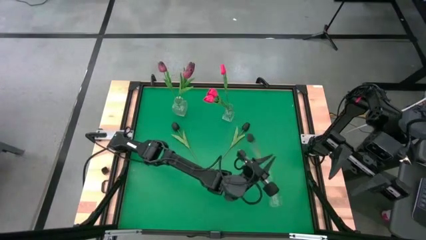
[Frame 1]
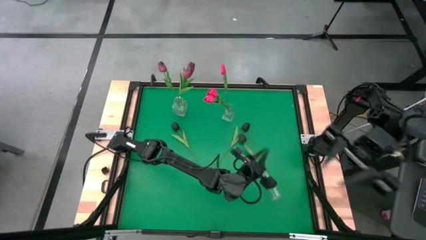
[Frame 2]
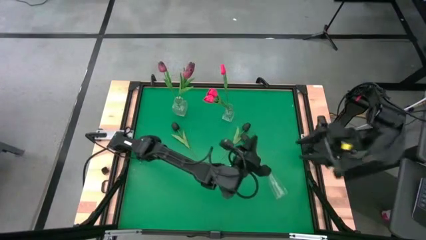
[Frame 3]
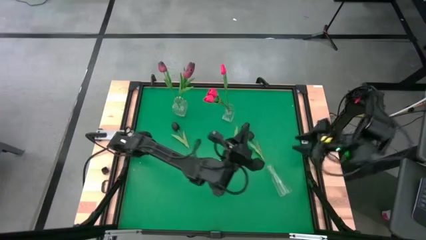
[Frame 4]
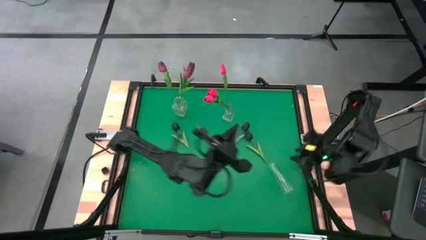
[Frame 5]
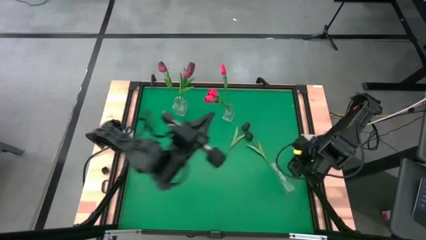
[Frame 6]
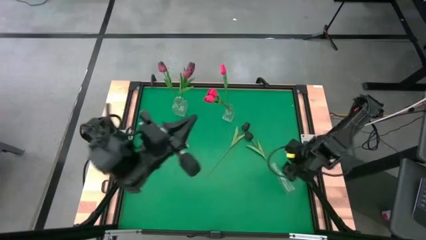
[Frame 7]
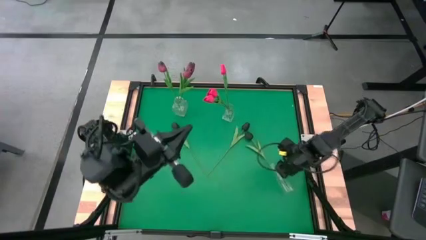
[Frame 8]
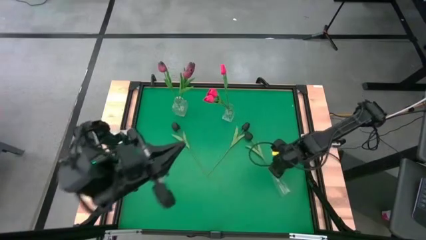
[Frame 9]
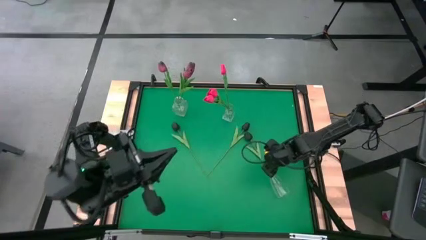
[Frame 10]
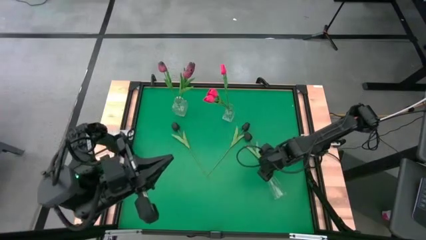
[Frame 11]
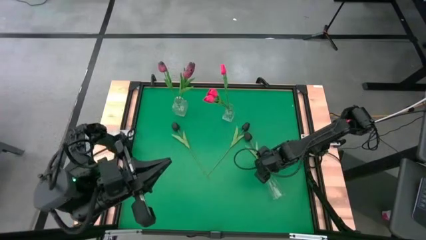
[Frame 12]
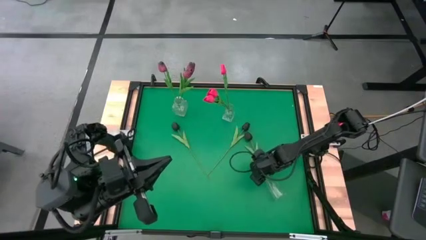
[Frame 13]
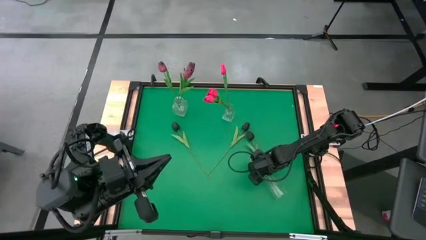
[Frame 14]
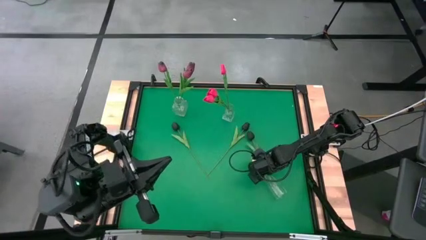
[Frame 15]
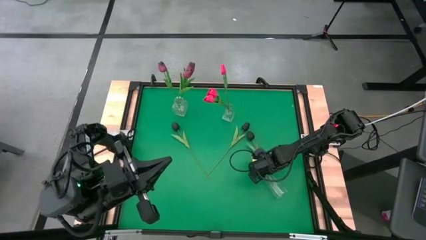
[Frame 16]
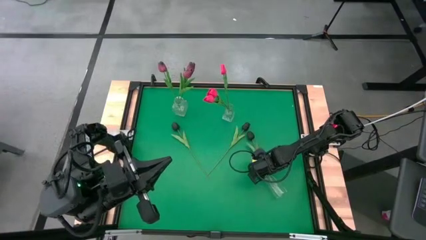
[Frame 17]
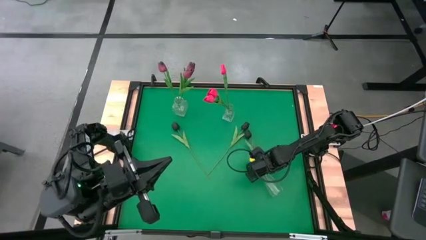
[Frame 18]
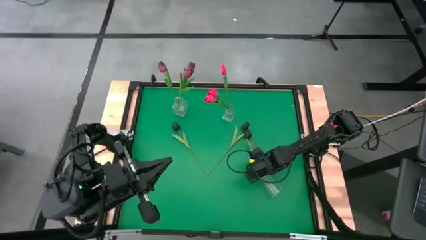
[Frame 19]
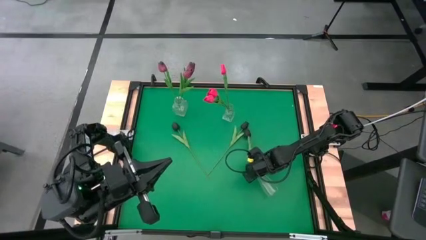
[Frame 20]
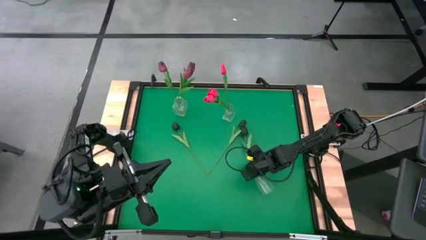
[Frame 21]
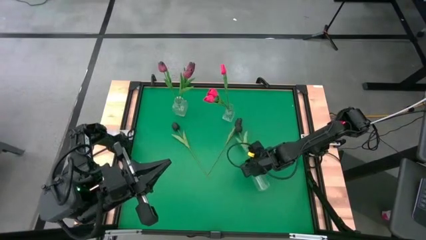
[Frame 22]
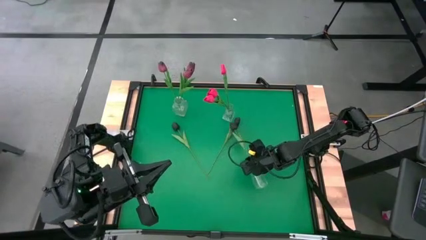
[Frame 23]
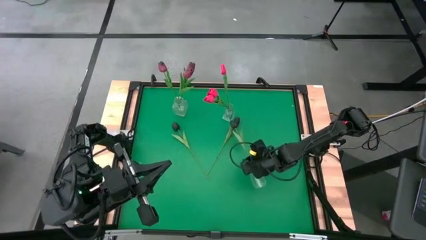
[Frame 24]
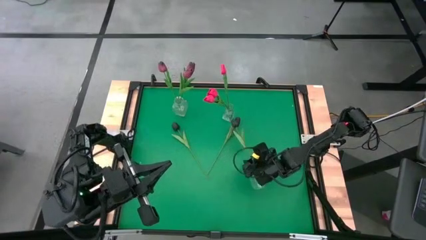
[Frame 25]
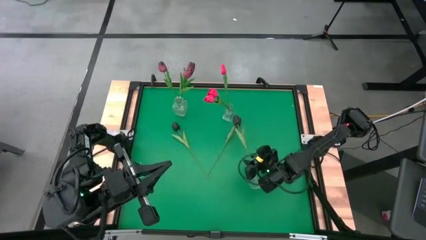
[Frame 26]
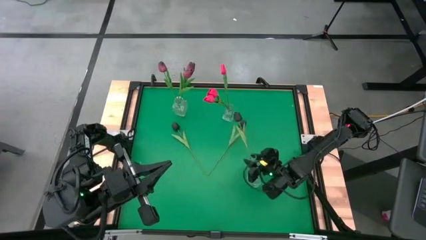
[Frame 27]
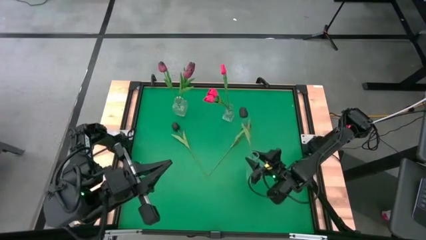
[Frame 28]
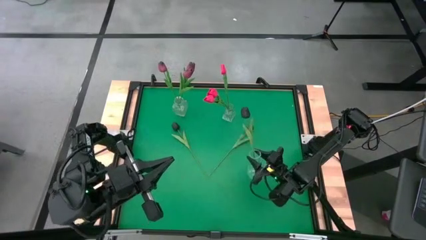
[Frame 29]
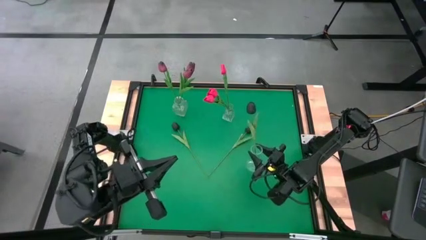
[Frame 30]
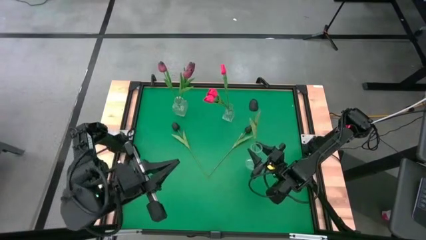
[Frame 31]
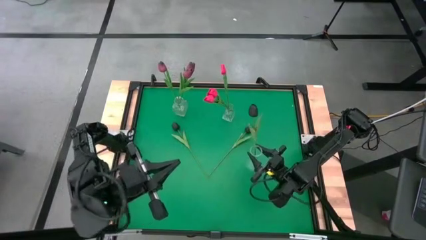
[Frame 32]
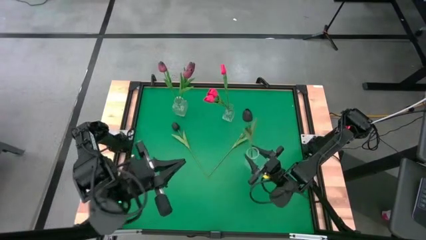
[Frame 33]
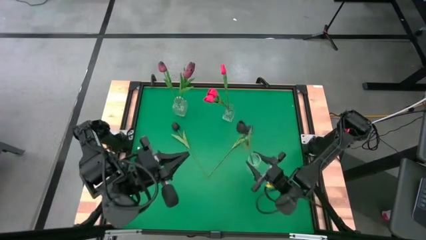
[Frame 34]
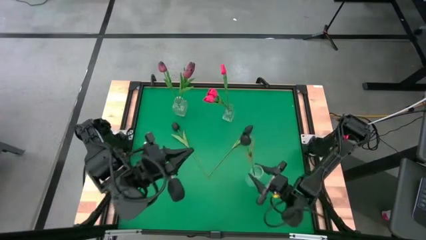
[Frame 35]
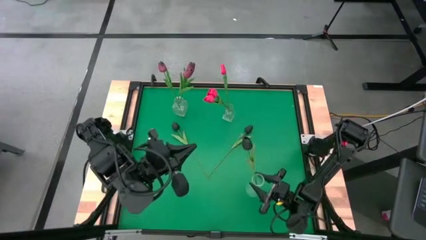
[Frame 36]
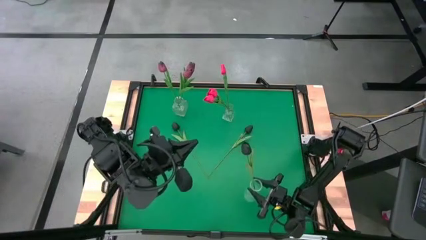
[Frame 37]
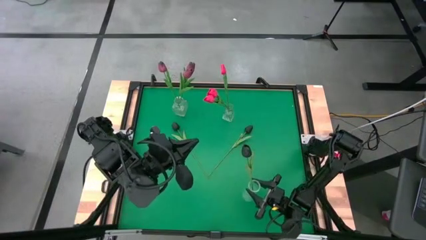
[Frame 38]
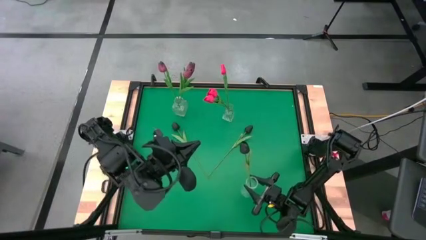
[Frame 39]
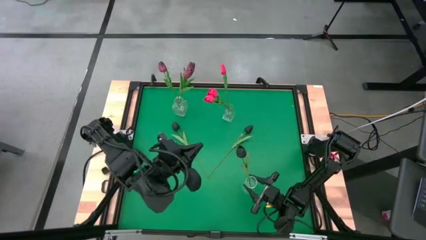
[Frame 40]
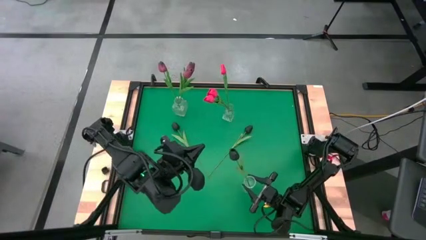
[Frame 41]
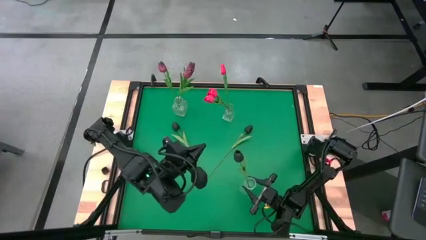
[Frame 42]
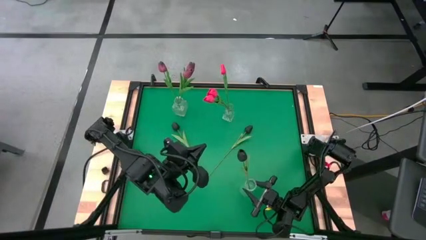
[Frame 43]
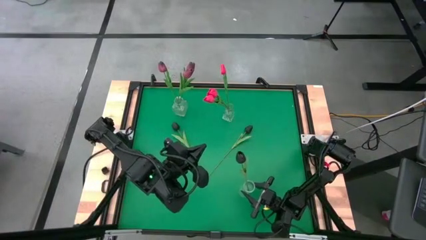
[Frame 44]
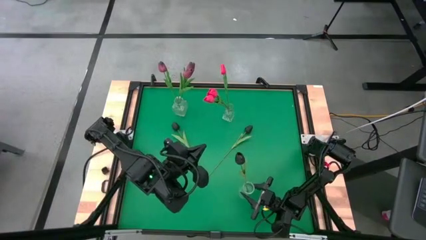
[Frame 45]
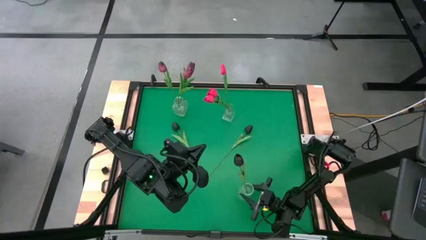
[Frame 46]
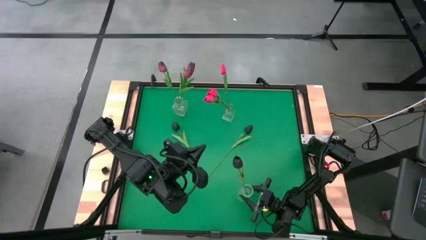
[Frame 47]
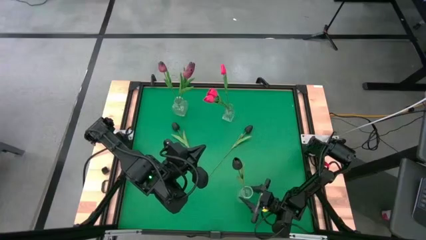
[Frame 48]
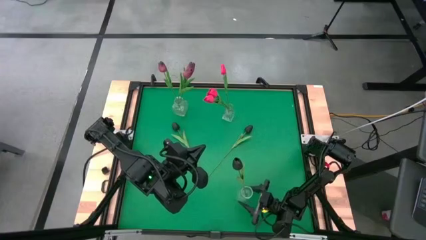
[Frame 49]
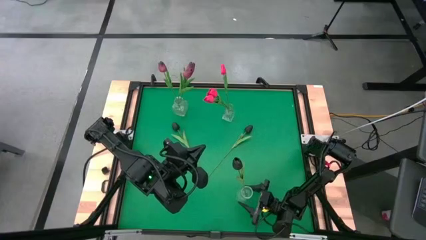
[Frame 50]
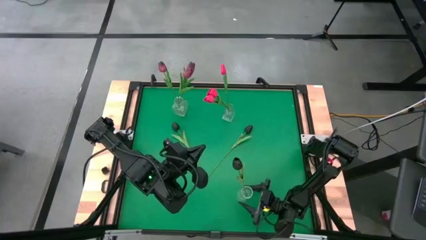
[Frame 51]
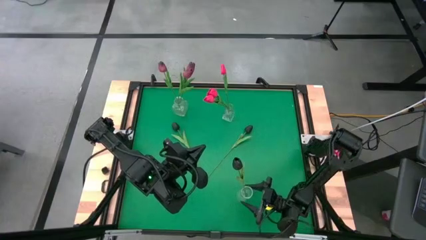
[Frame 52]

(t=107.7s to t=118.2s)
Task: Sort flowers into vase by color
Adjust the bottom transparent vase

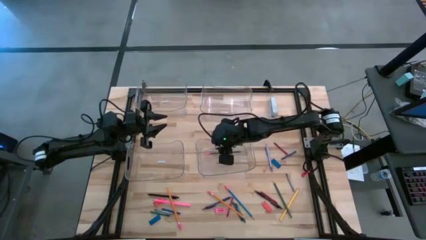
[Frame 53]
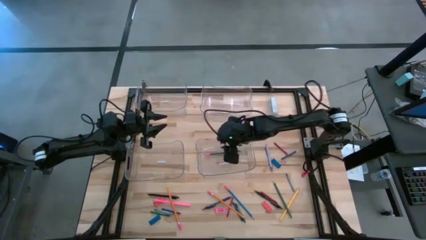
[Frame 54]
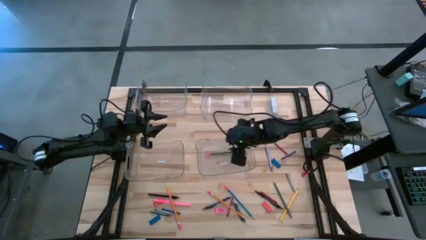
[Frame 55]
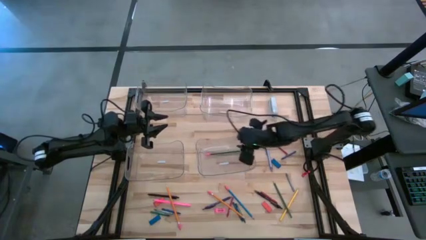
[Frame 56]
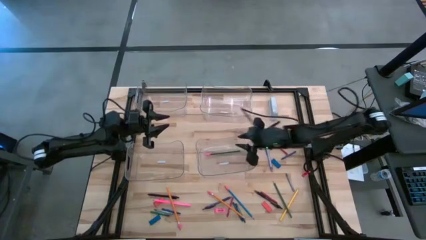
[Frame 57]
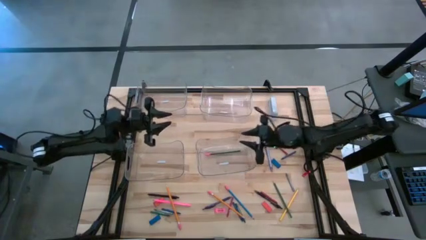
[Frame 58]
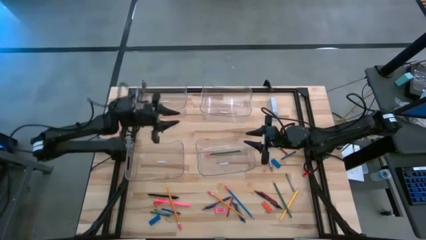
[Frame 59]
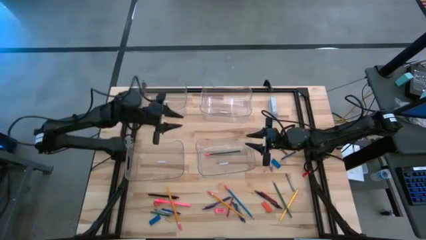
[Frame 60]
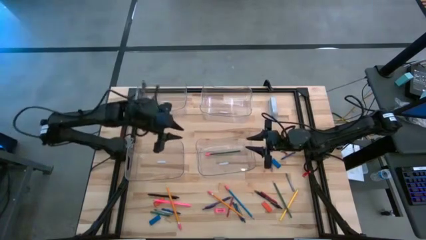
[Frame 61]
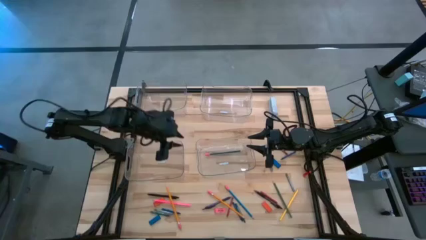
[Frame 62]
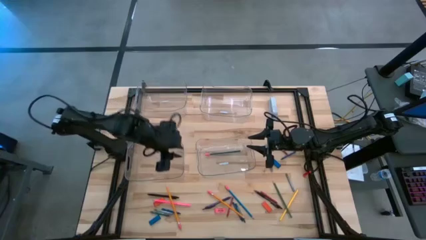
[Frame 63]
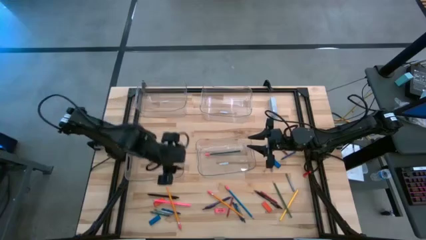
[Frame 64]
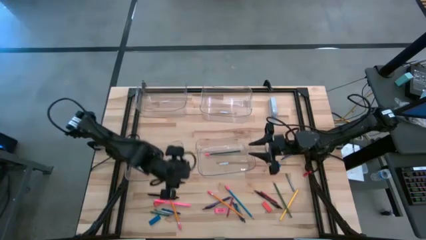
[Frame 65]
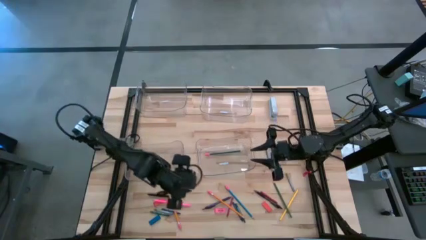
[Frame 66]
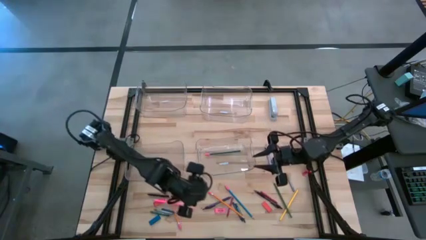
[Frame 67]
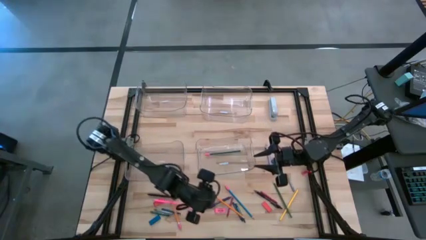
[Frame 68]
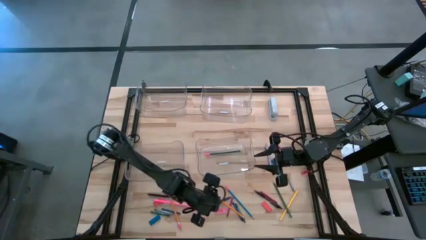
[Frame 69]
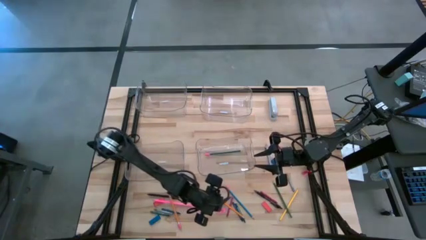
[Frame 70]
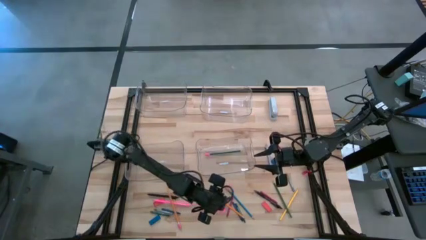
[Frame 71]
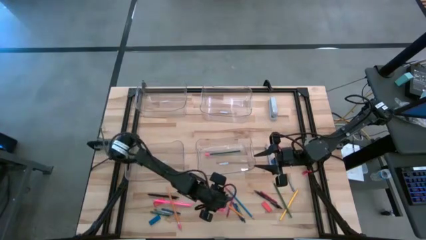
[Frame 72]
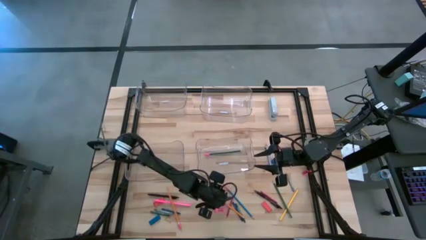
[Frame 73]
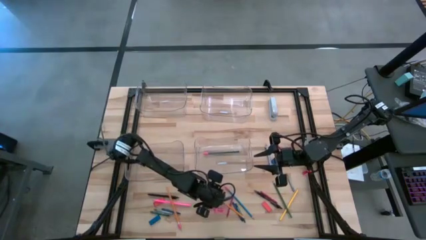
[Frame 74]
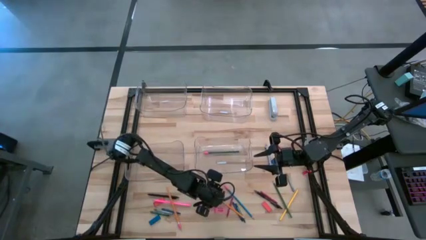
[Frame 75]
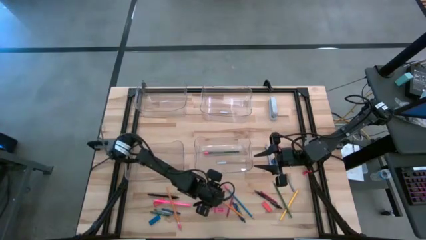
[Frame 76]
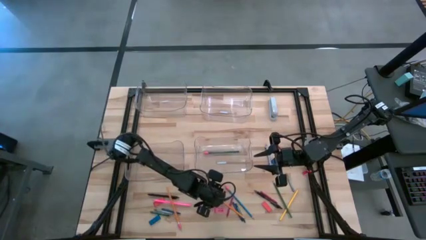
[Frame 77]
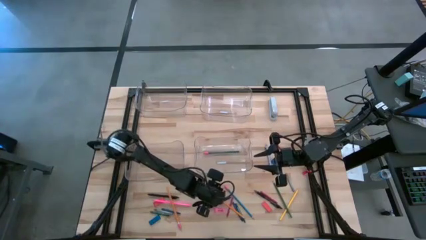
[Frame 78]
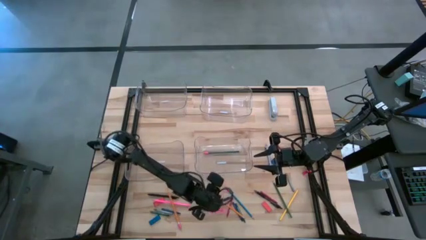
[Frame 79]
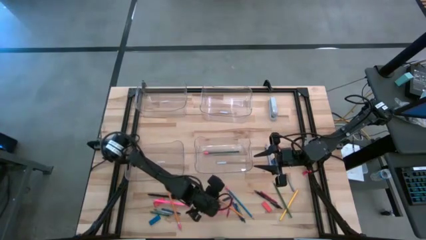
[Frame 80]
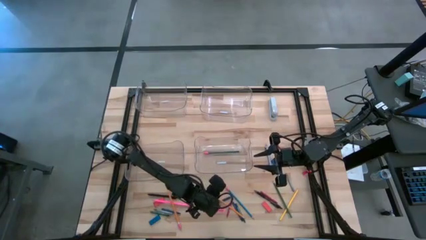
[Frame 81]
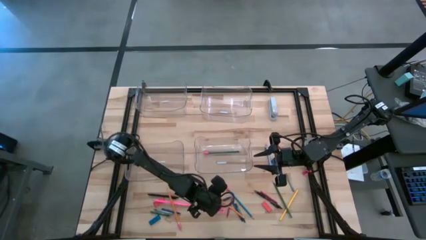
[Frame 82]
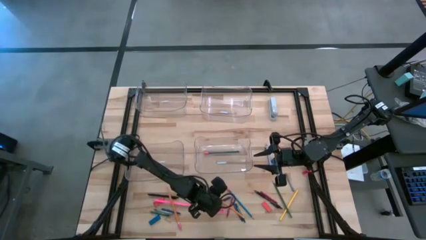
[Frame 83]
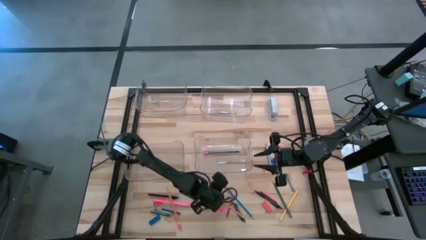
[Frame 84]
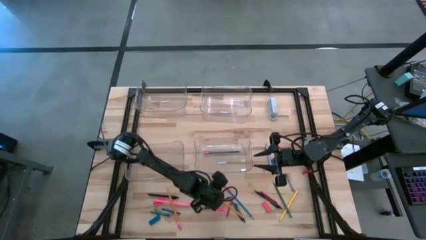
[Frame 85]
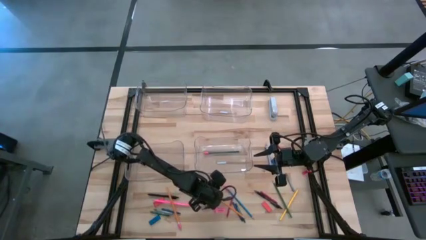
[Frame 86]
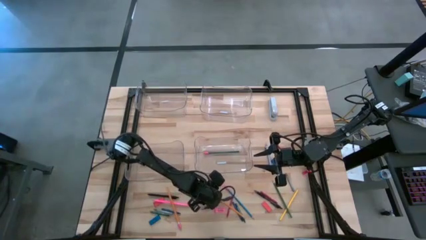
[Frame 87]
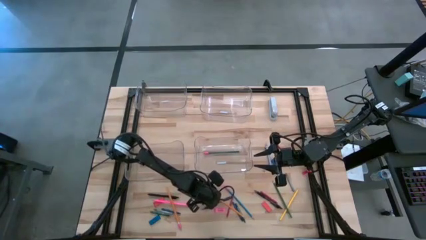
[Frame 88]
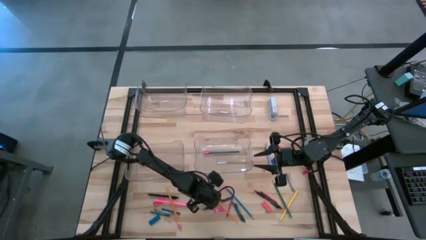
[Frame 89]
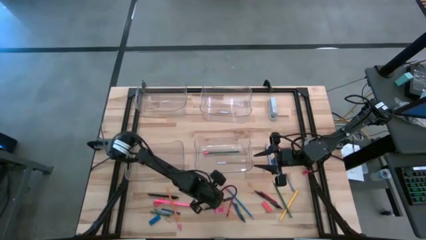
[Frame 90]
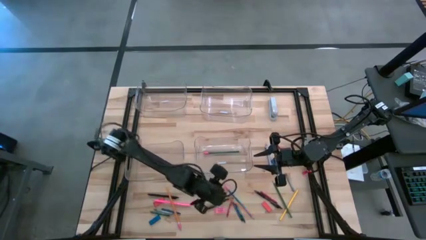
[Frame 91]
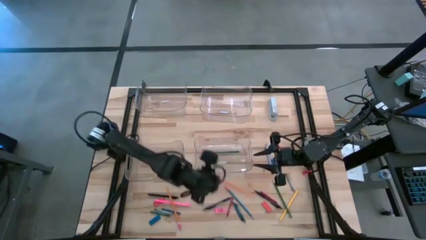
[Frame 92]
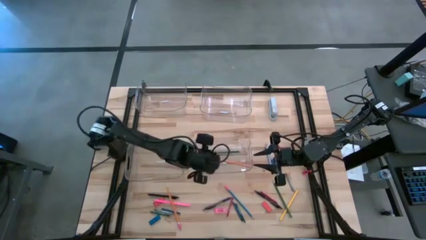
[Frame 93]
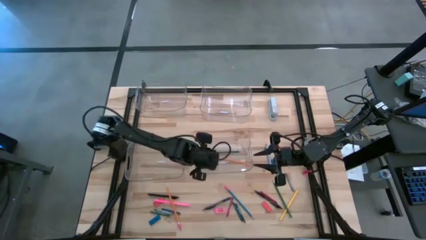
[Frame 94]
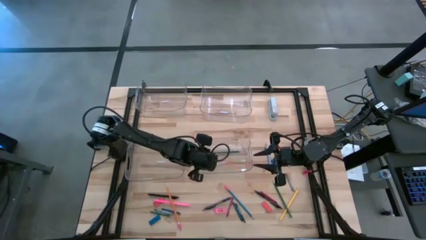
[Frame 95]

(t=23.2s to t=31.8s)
Task: Sort crayons/erasers/pens/pencils in bins
Put the right orange pencil into the bottom right transparent bin
